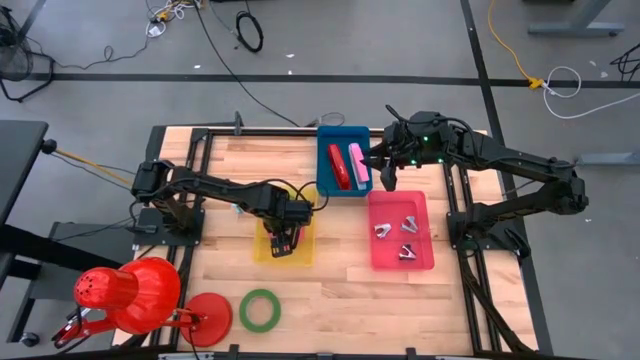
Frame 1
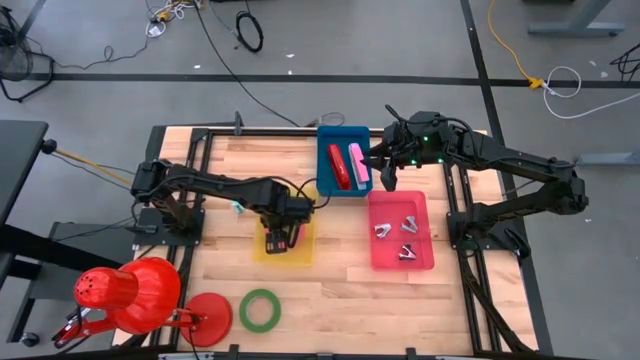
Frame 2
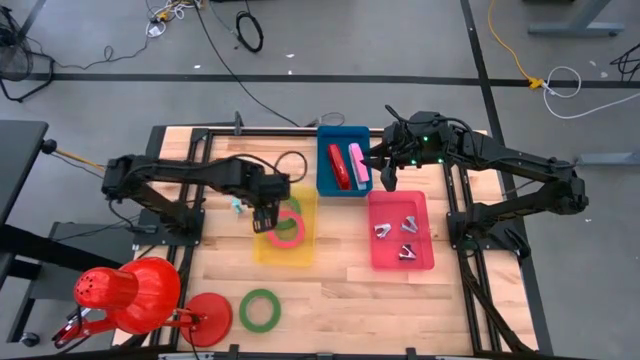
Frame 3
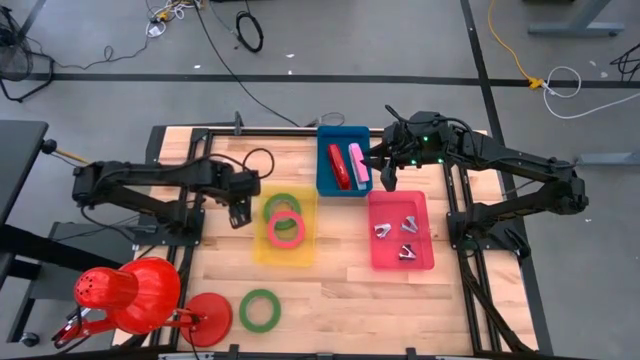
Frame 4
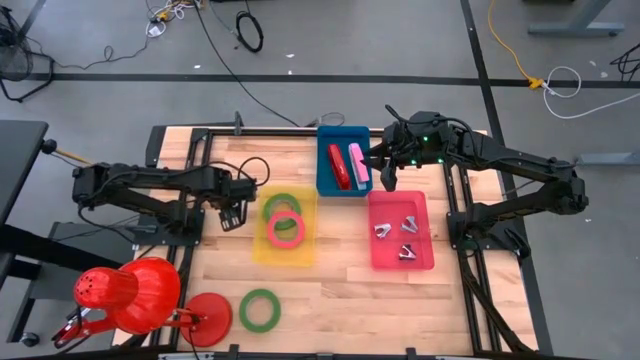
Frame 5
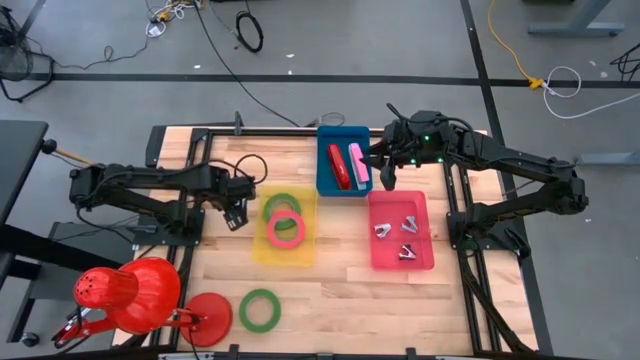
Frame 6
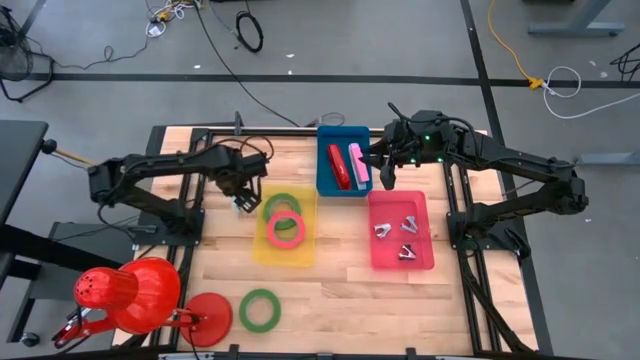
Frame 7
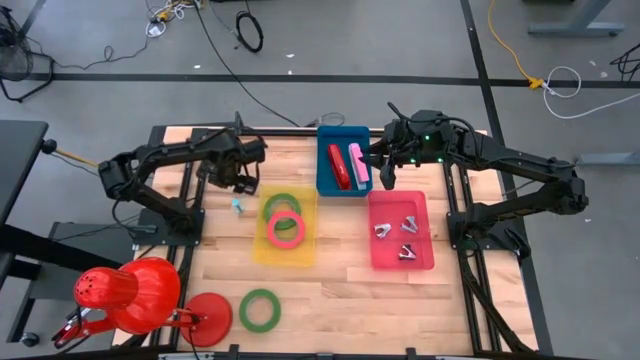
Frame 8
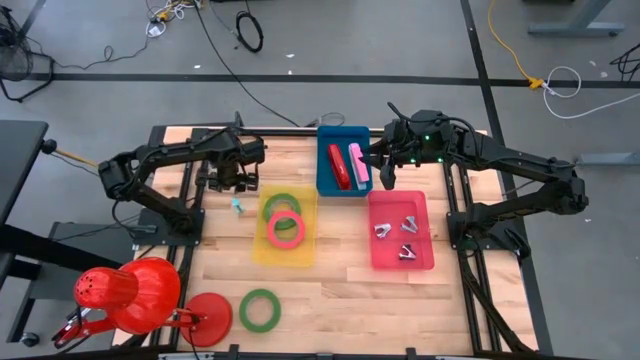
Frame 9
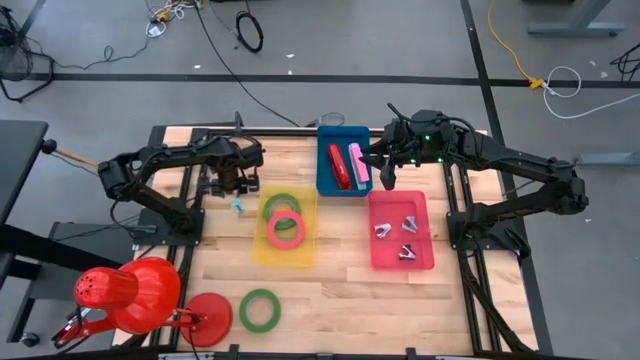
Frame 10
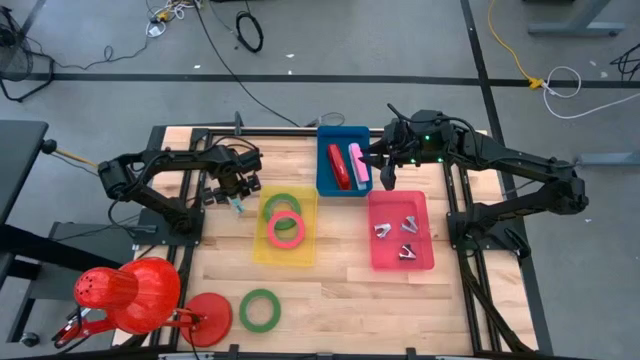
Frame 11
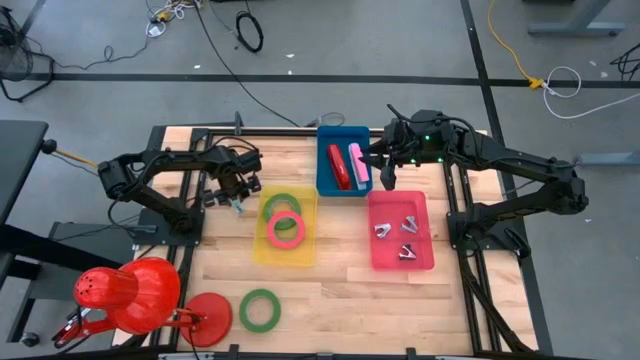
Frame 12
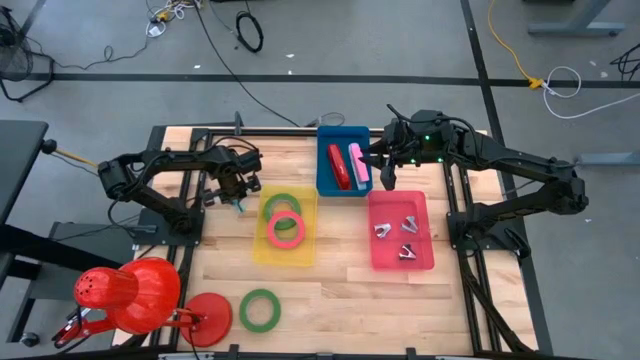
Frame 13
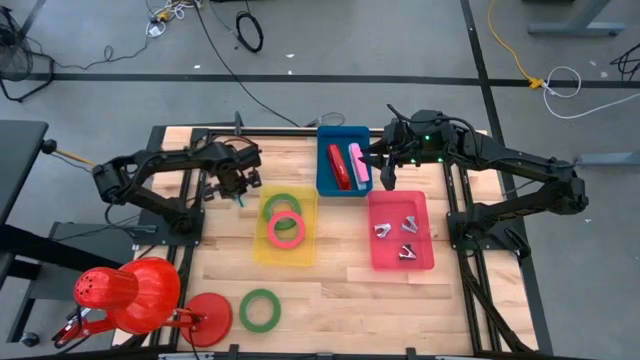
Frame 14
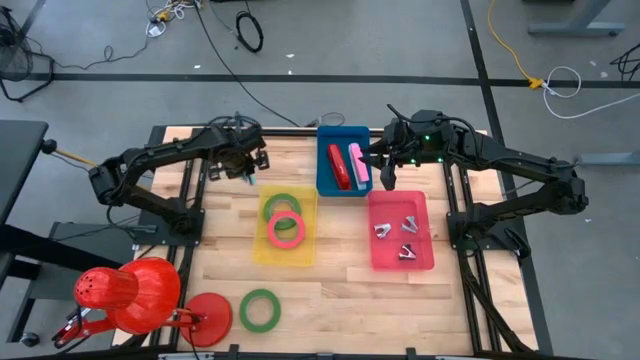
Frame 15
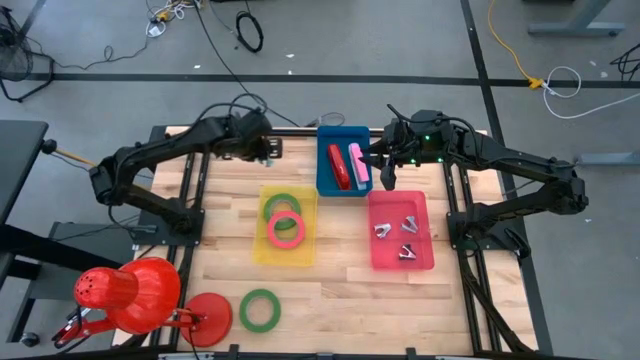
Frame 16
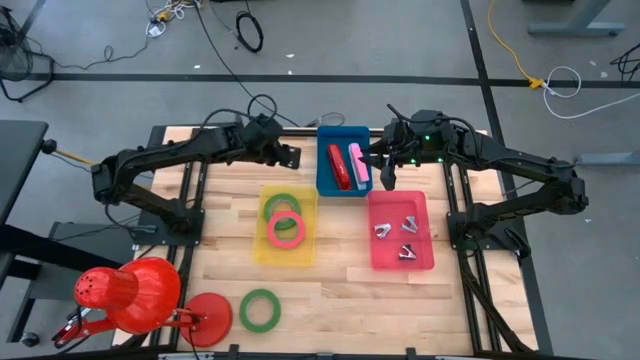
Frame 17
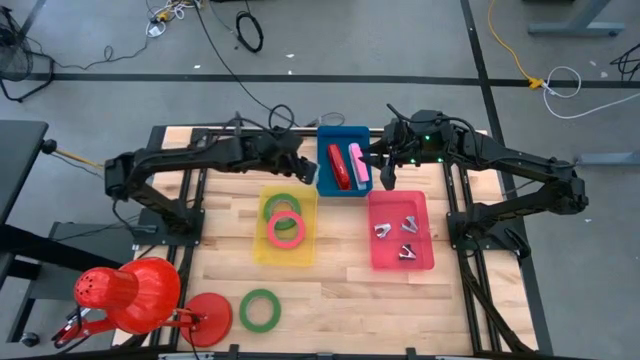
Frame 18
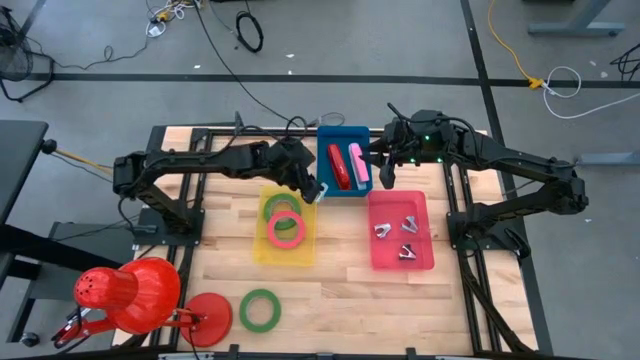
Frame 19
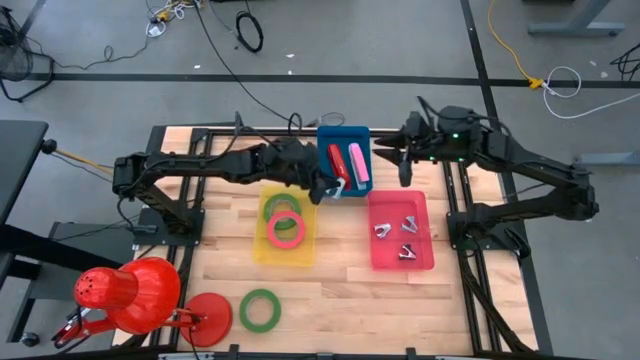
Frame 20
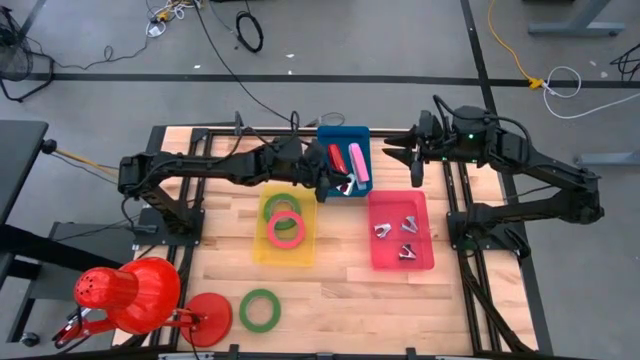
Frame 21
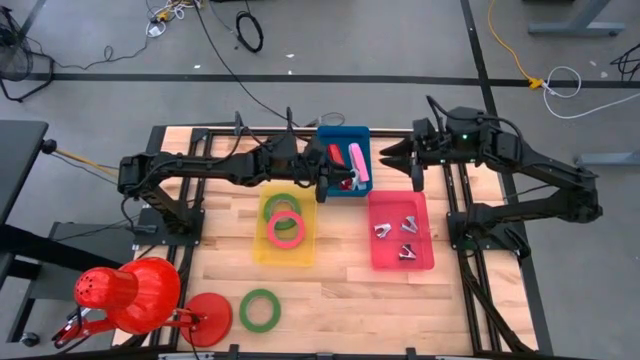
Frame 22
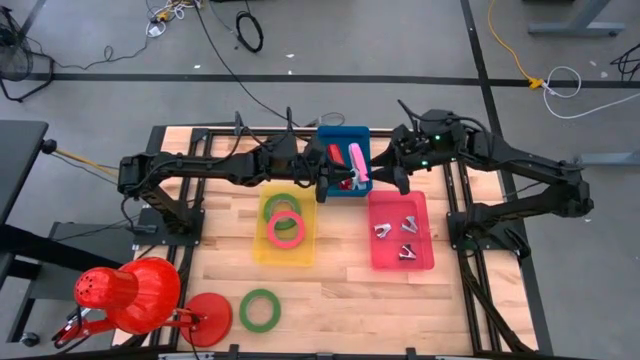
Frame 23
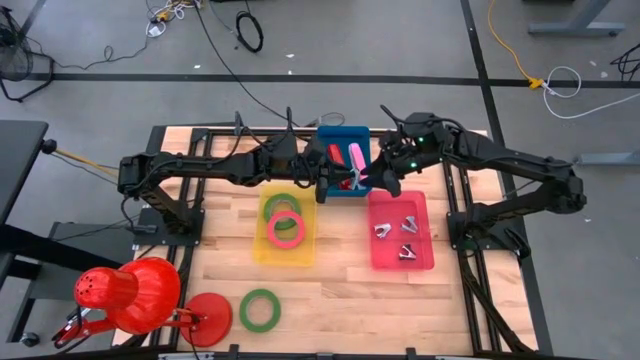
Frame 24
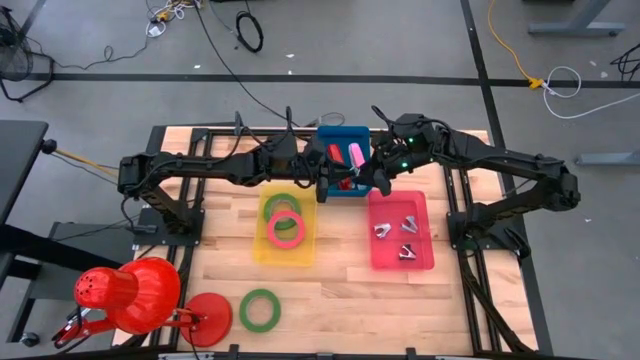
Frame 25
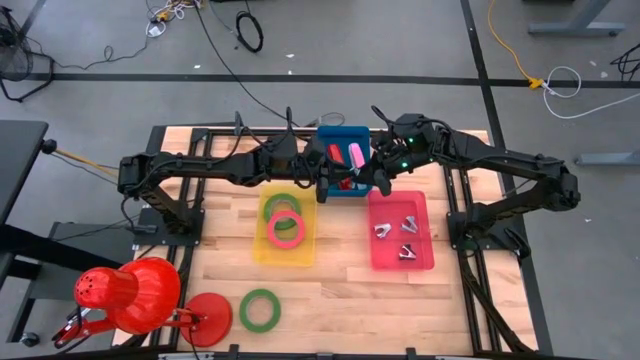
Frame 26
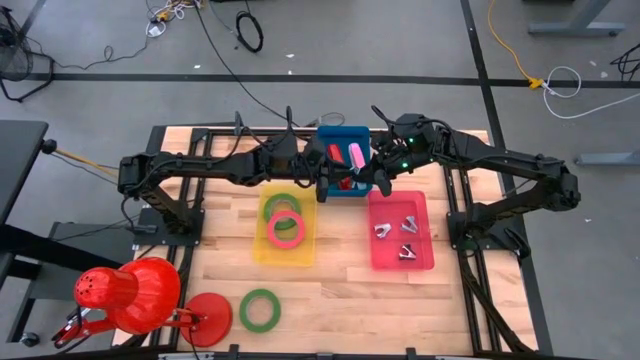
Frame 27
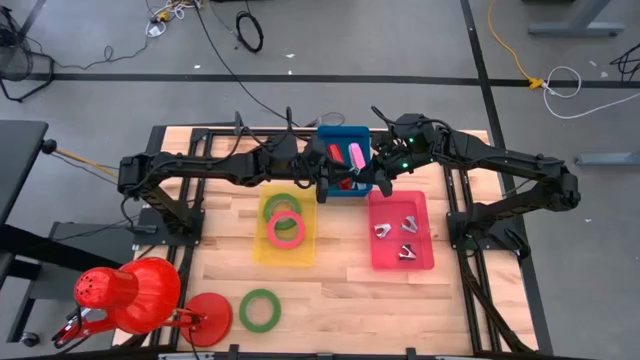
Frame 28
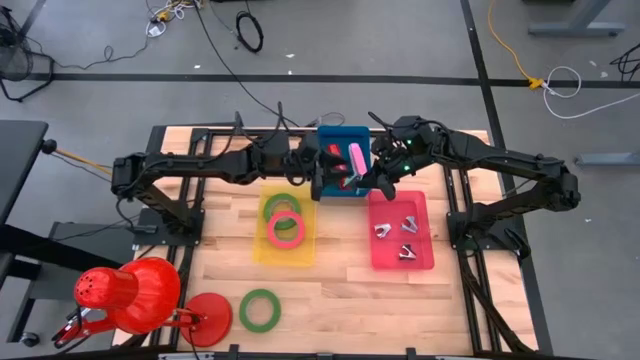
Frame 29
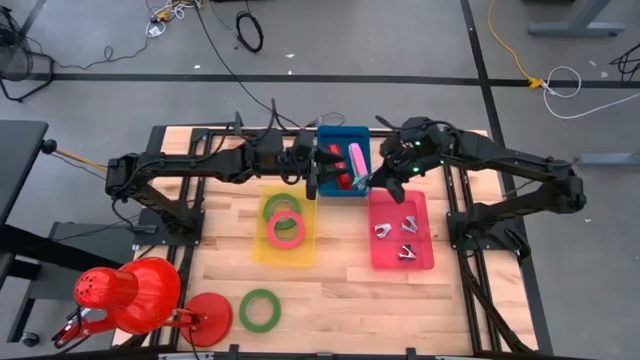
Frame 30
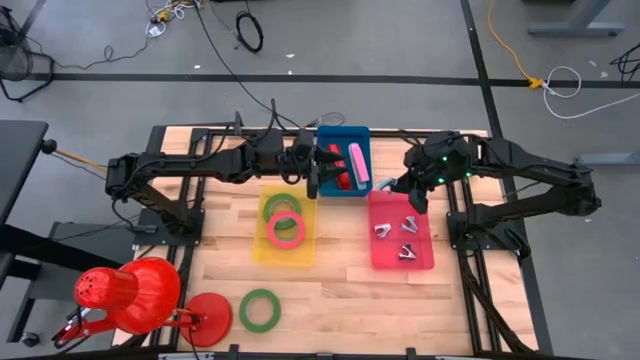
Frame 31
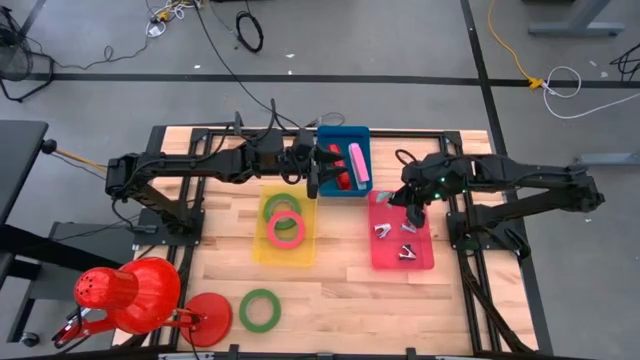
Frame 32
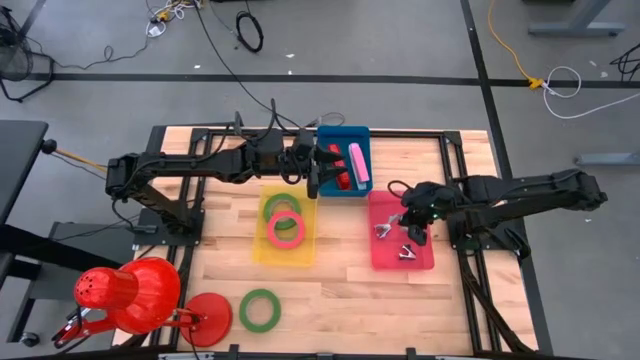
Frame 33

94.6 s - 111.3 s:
Task: Pick and place Stapler, Stapler remover, tape
Put the light blue staple remover into the red bin

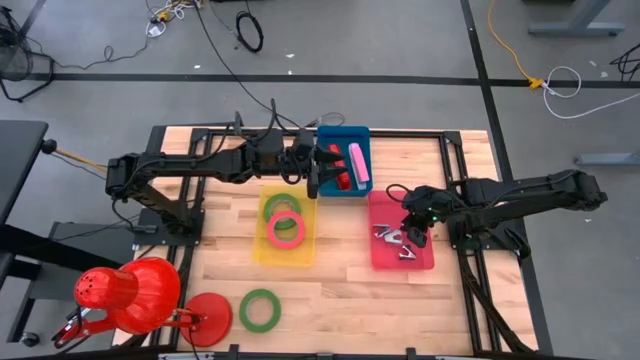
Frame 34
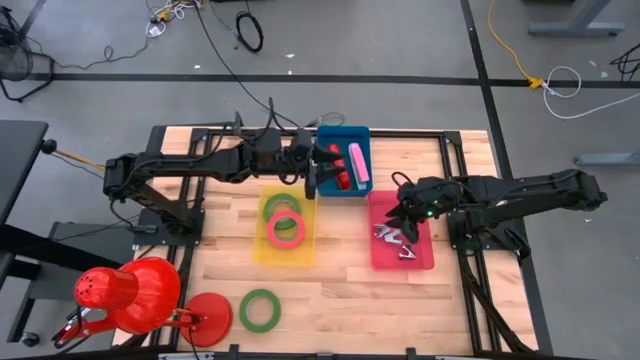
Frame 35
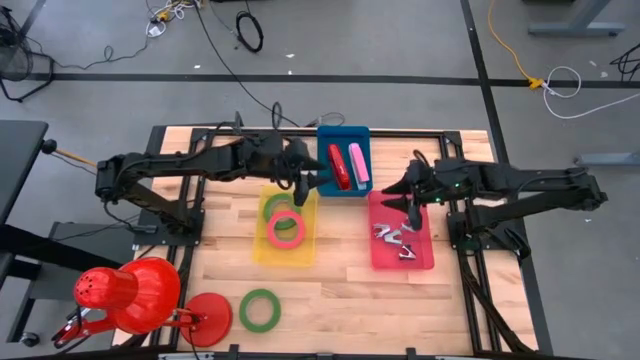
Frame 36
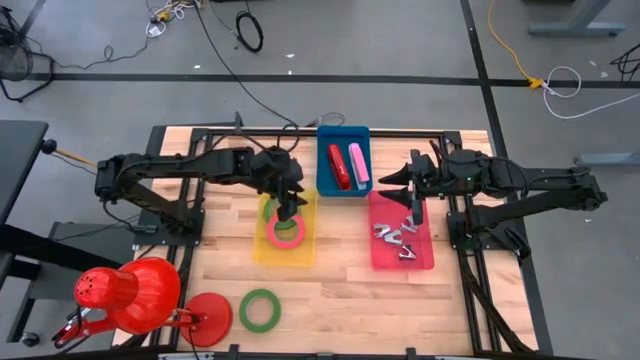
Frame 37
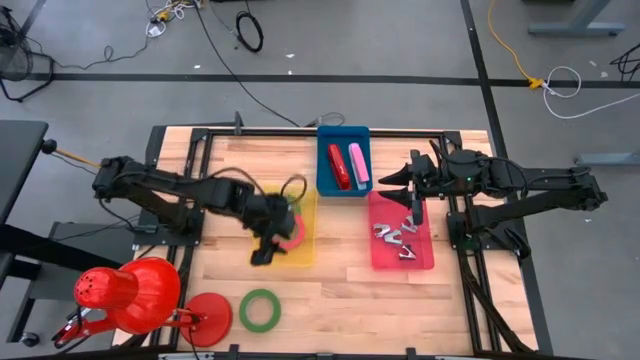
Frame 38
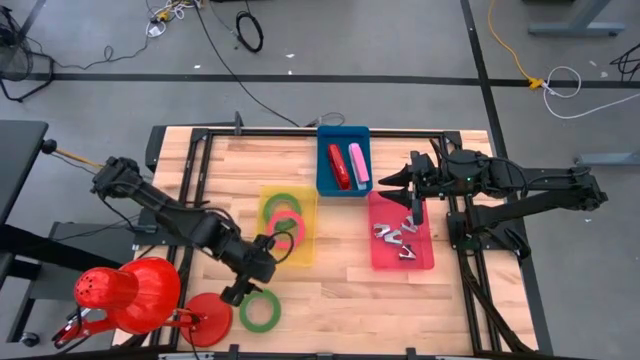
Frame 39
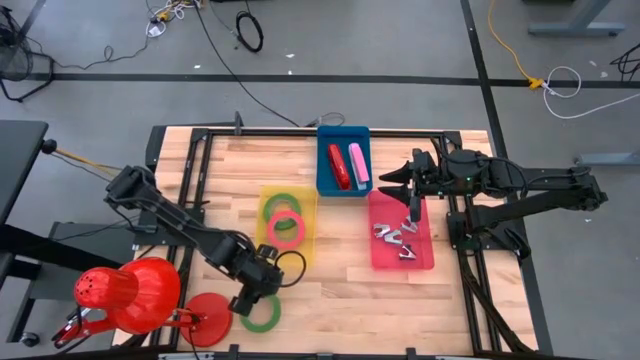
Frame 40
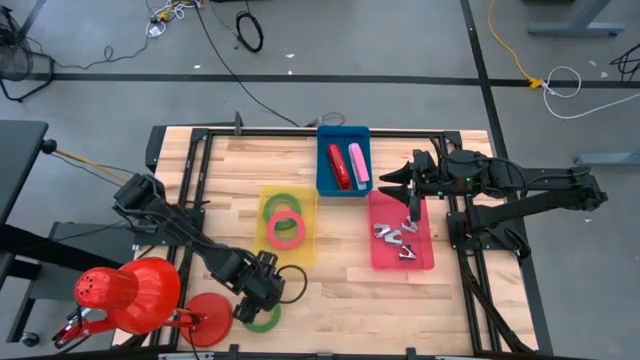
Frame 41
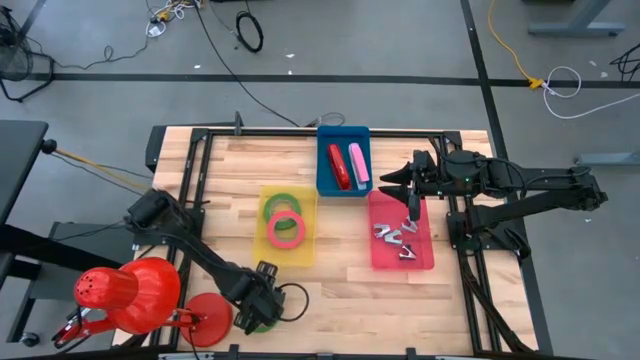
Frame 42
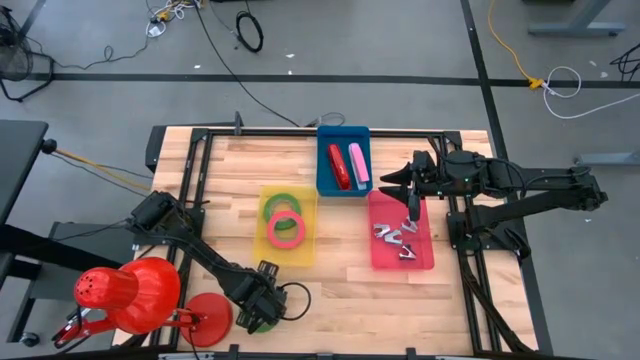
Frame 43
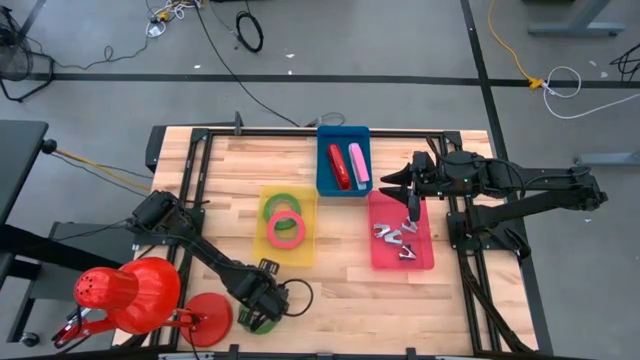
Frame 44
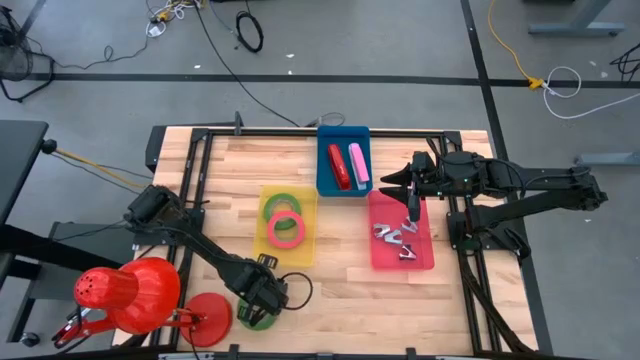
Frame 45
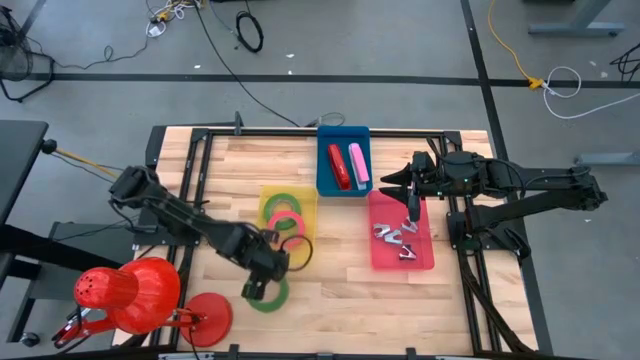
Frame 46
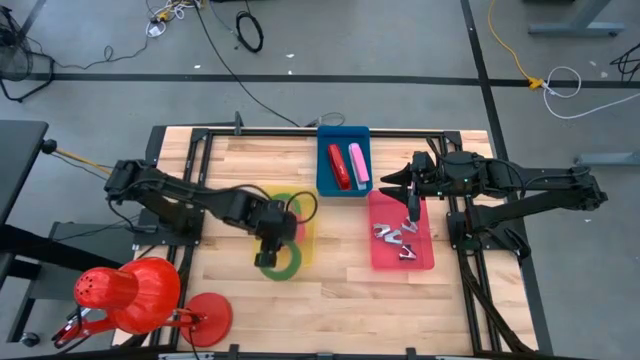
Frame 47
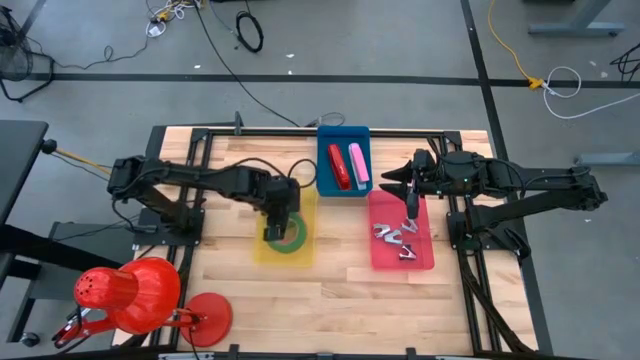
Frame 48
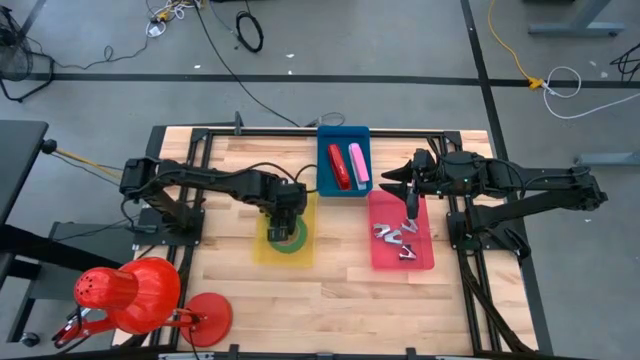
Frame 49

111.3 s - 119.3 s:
Put the green tape into the yellow bin
